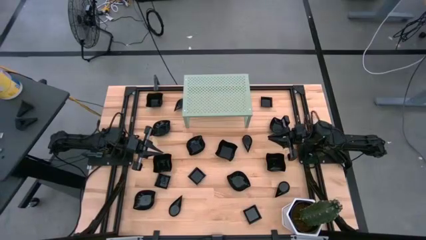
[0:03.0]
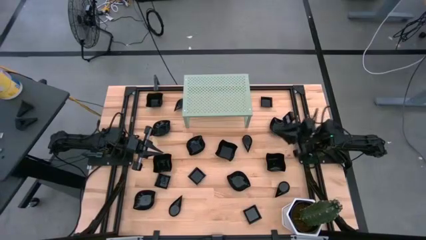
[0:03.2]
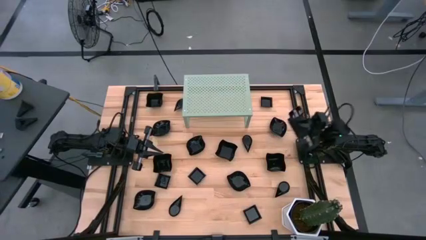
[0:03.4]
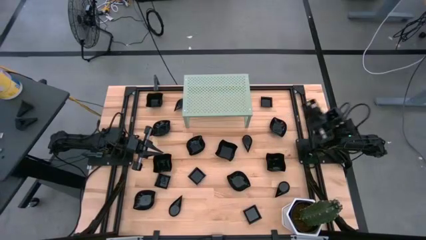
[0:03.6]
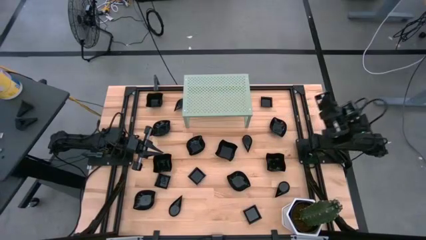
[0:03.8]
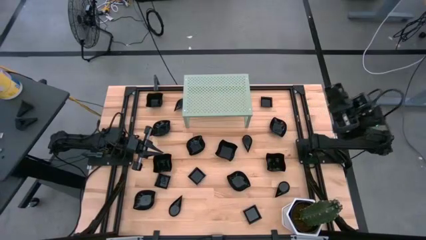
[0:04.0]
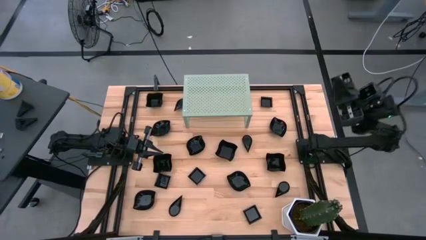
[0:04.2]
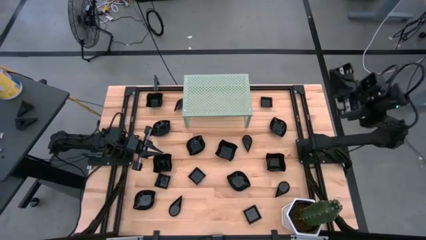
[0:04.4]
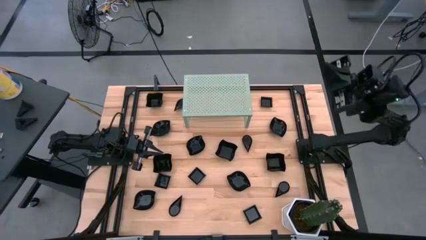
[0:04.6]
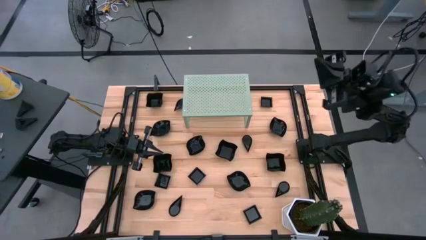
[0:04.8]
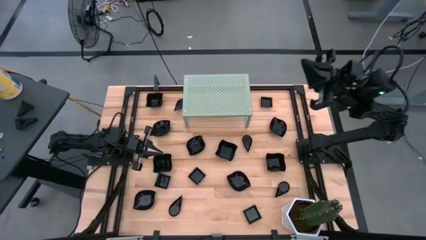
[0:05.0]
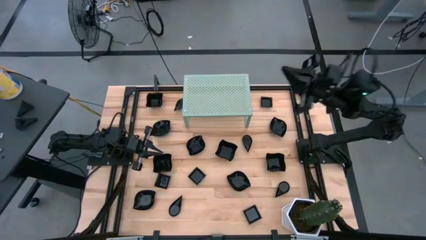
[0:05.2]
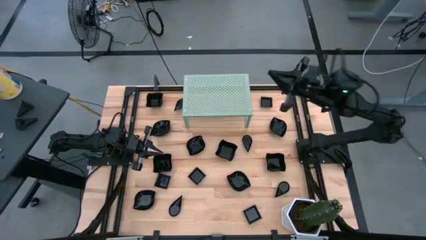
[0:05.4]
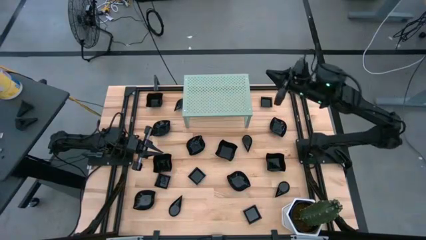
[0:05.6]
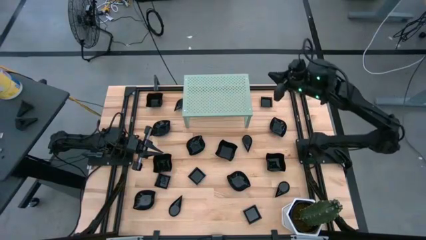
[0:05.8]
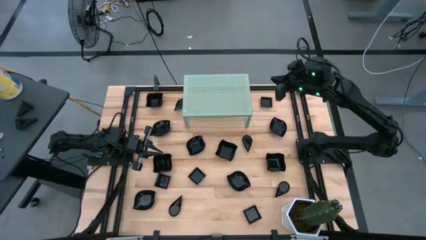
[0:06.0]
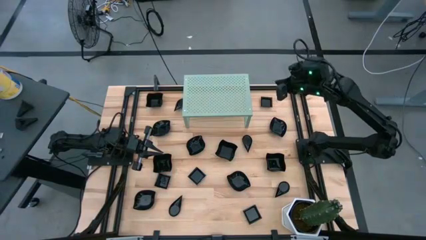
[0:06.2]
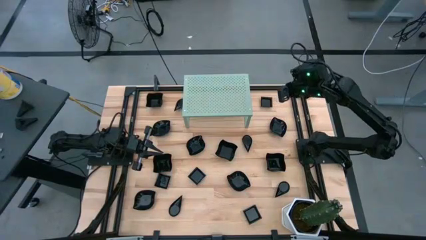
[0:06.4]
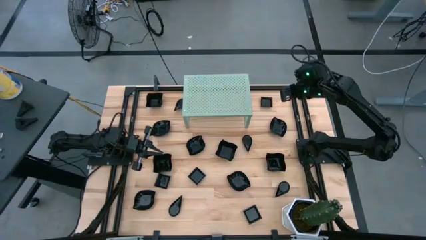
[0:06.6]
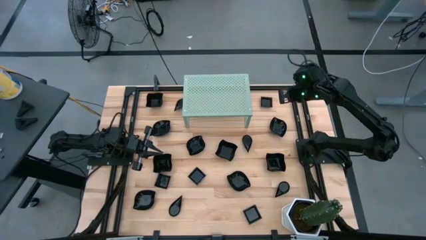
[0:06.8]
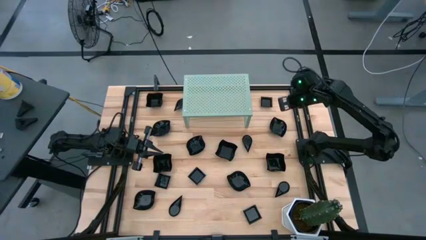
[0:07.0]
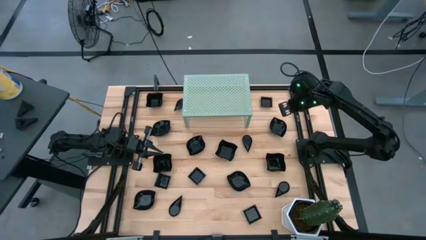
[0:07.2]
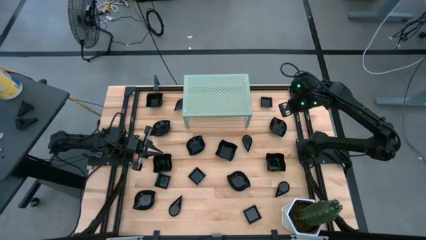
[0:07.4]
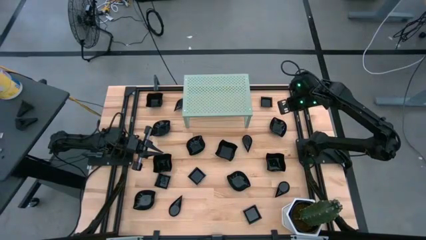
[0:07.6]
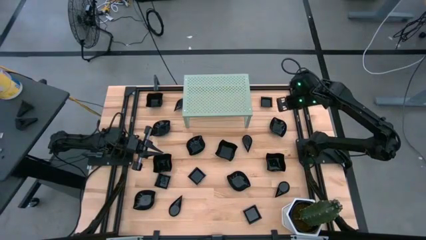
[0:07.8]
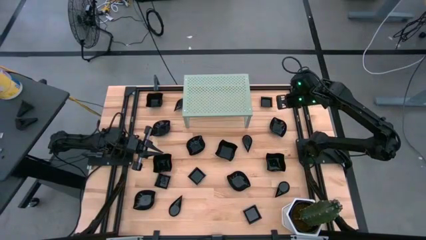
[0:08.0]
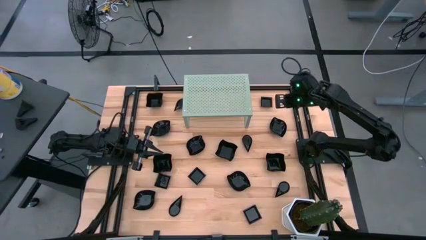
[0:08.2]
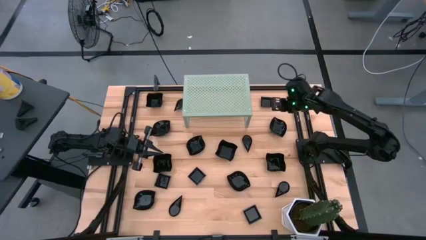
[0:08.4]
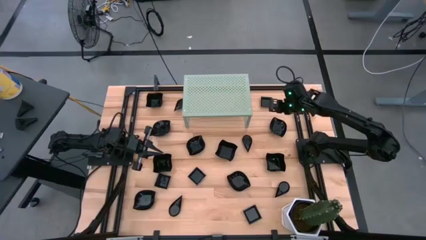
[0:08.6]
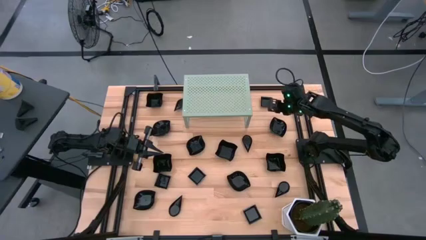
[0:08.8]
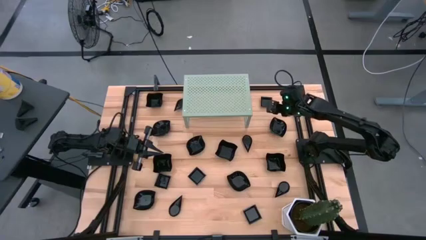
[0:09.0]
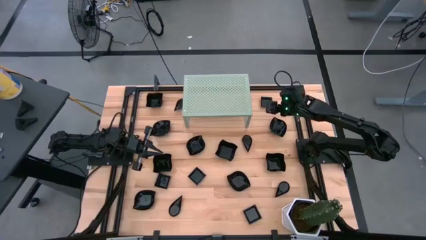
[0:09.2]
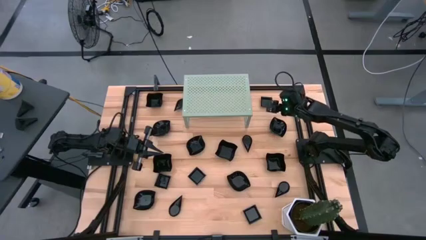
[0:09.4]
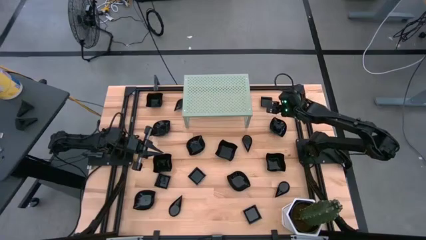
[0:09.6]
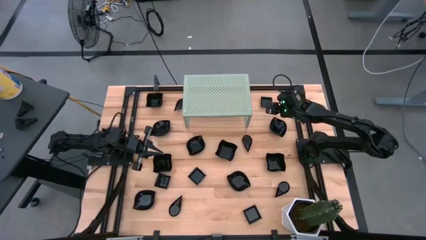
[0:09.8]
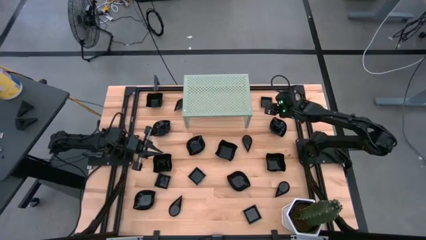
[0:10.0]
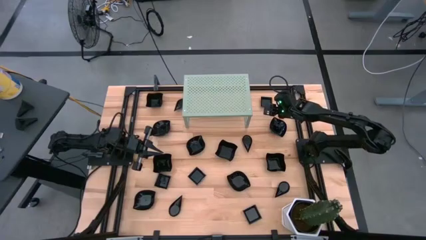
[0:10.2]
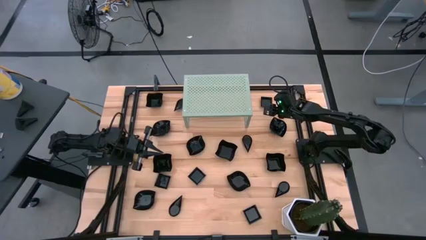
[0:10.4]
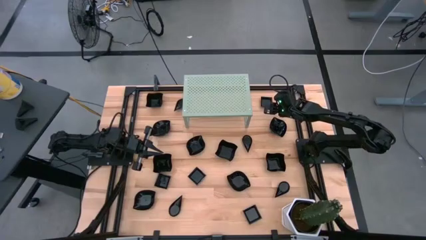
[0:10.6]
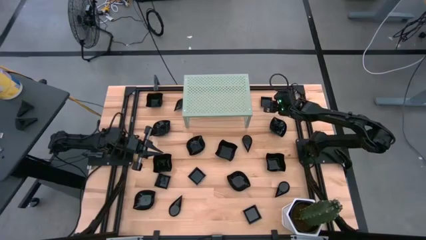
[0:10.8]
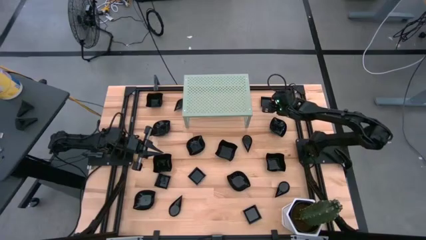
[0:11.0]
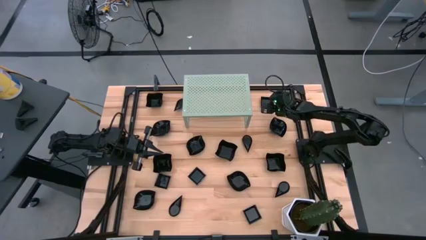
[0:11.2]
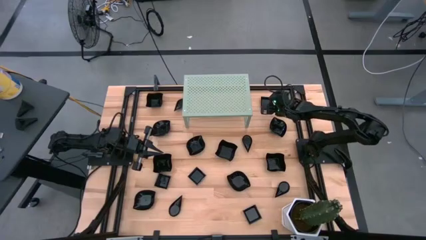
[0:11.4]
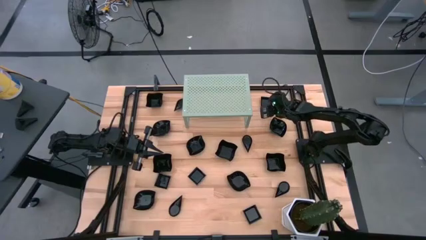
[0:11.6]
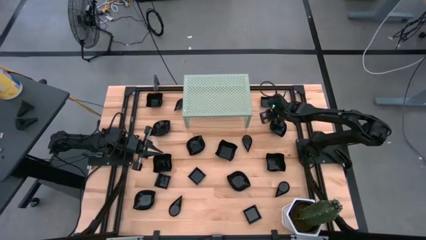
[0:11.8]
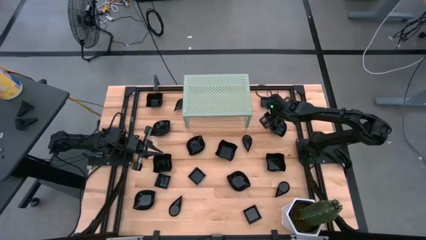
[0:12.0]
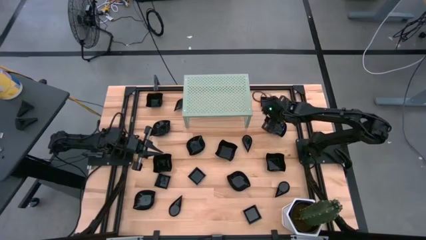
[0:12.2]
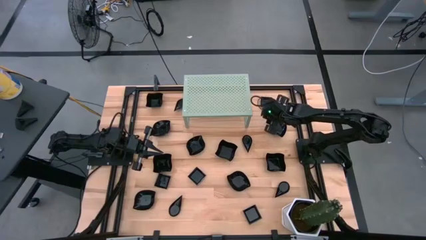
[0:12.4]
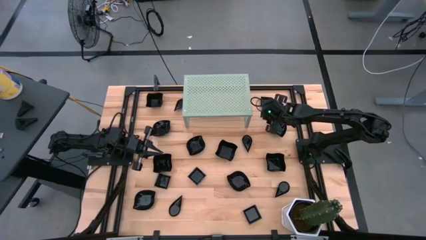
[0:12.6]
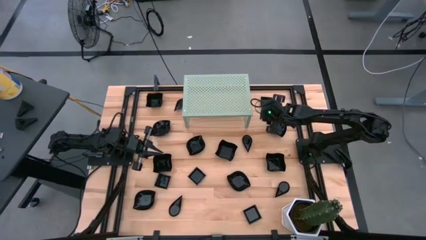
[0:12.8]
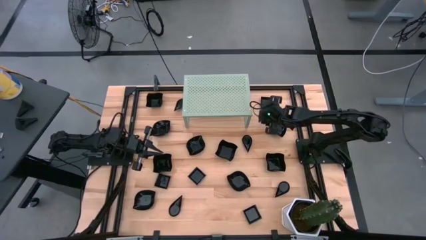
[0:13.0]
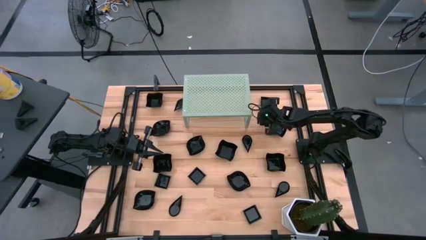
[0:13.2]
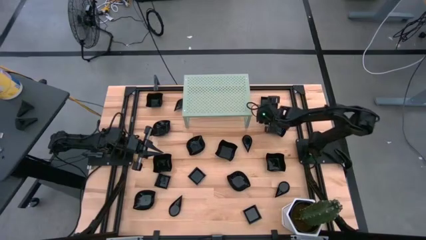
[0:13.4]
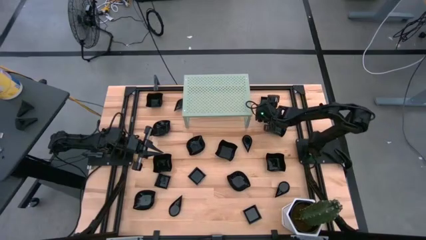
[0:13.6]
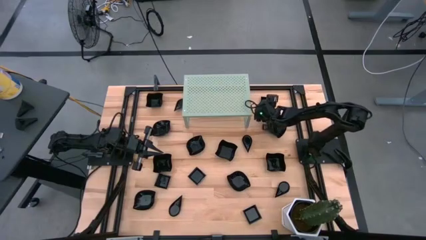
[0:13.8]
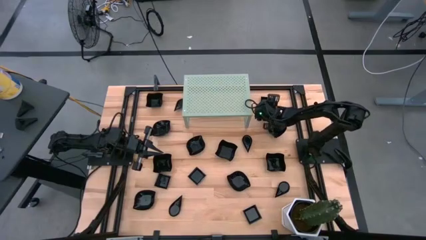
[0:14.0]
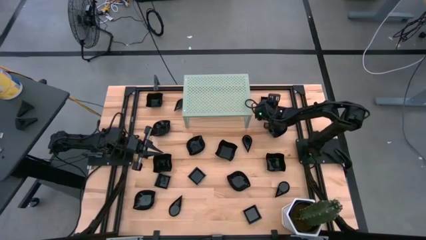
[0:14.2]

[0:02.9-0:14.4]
Task: Pick & Place Mini shaped plates
Put the square plate on the shelf

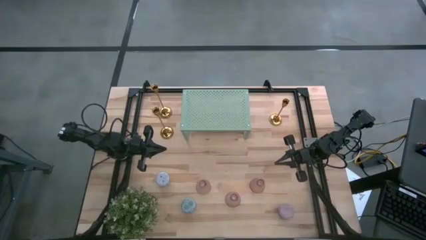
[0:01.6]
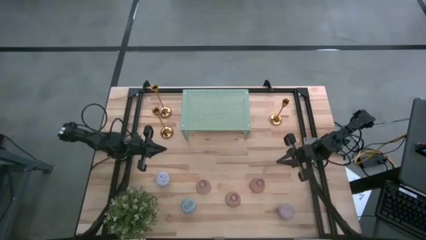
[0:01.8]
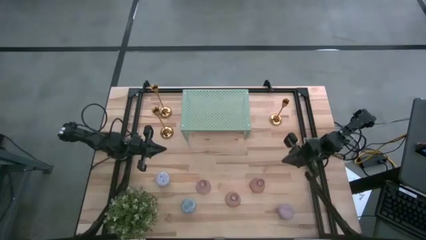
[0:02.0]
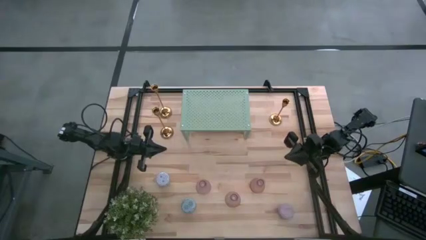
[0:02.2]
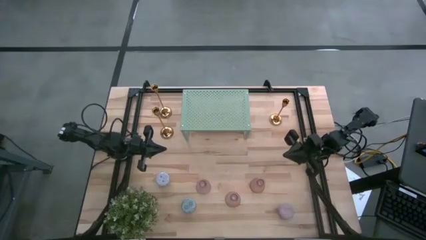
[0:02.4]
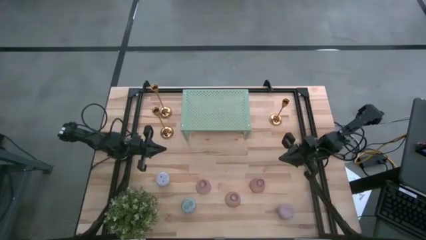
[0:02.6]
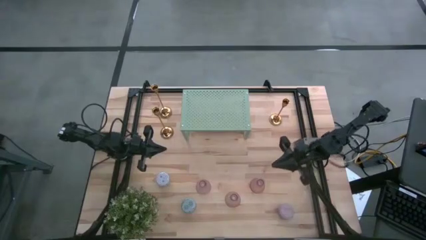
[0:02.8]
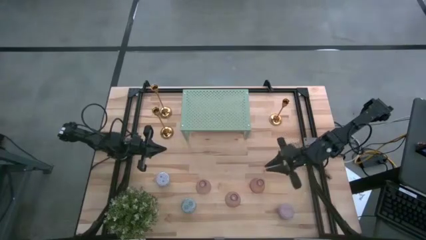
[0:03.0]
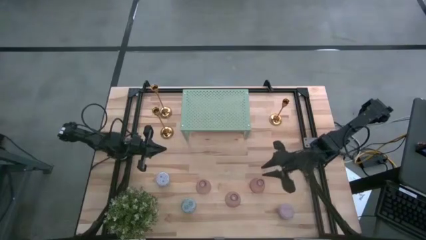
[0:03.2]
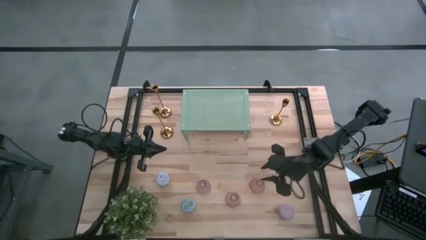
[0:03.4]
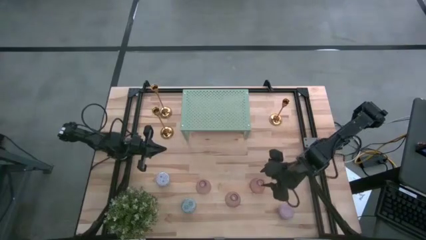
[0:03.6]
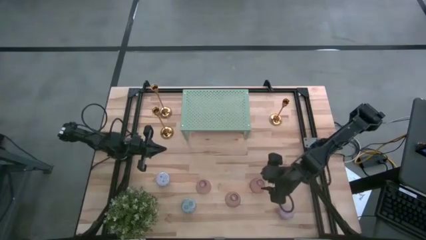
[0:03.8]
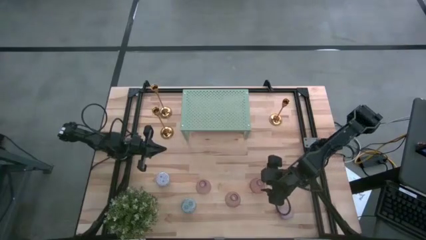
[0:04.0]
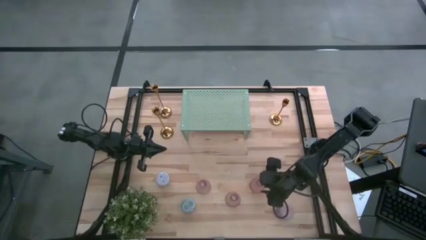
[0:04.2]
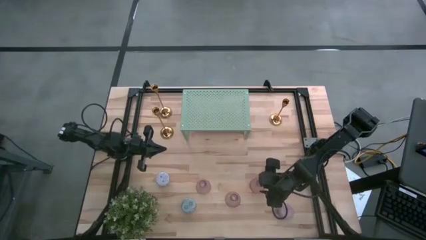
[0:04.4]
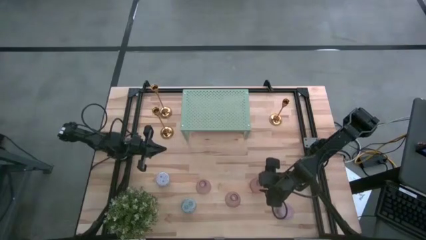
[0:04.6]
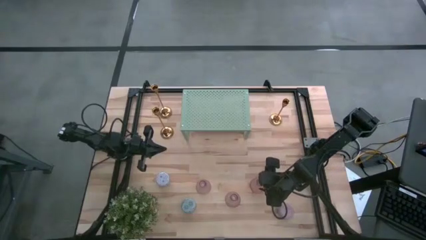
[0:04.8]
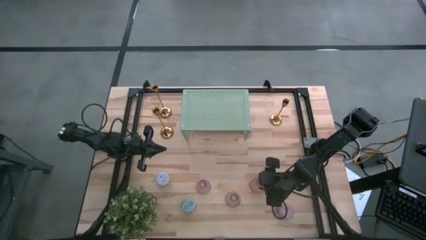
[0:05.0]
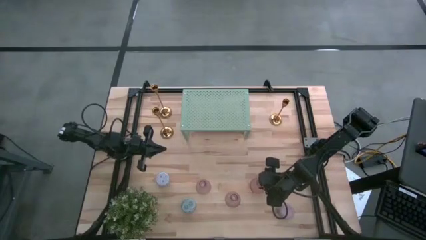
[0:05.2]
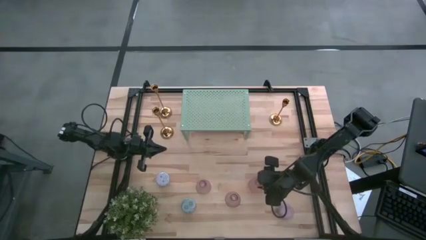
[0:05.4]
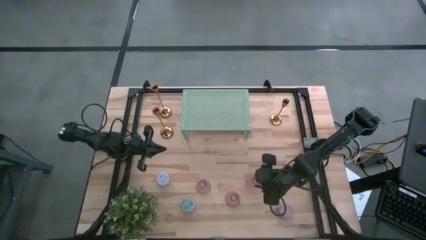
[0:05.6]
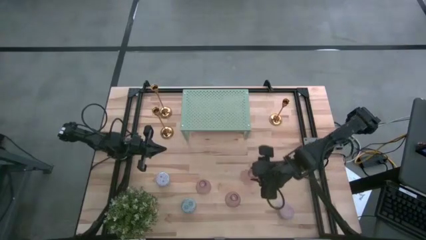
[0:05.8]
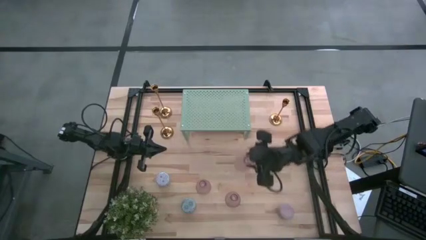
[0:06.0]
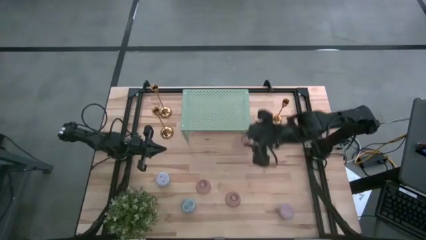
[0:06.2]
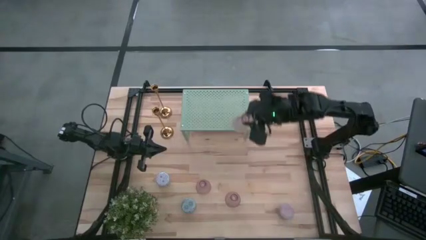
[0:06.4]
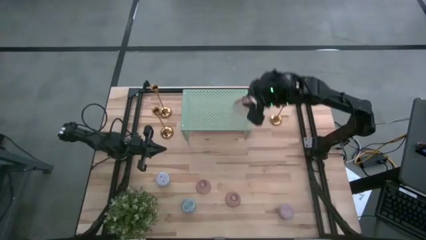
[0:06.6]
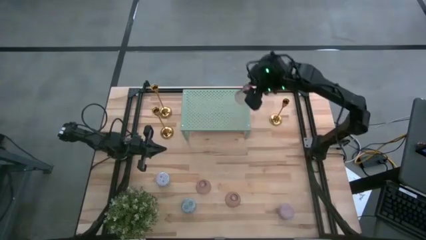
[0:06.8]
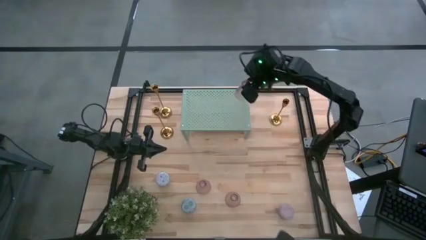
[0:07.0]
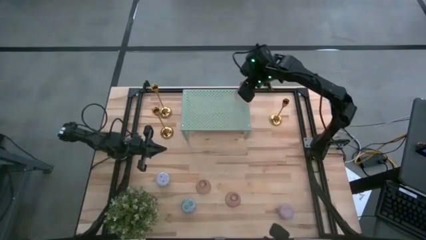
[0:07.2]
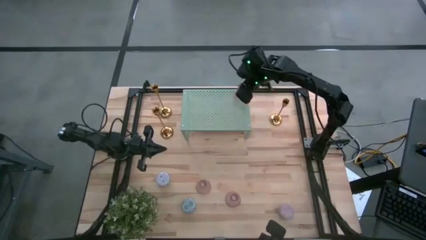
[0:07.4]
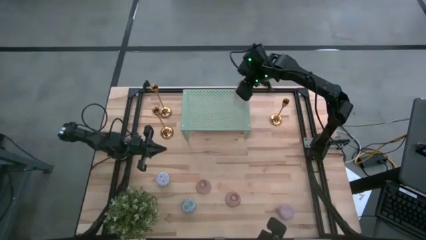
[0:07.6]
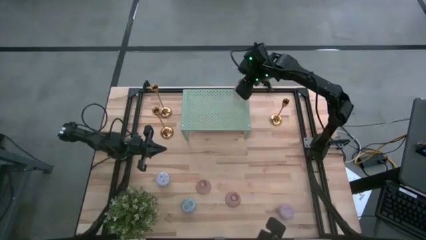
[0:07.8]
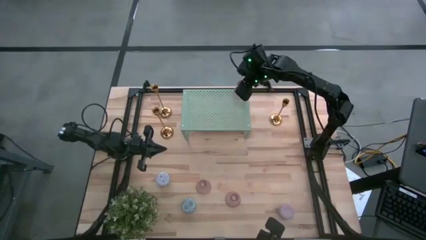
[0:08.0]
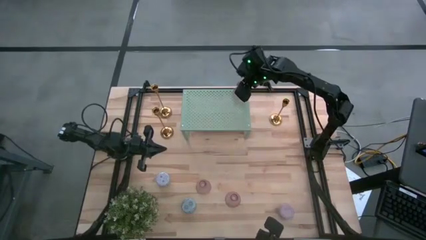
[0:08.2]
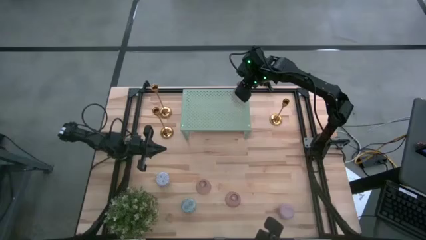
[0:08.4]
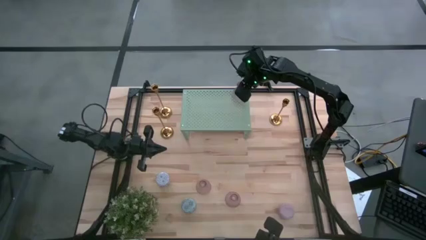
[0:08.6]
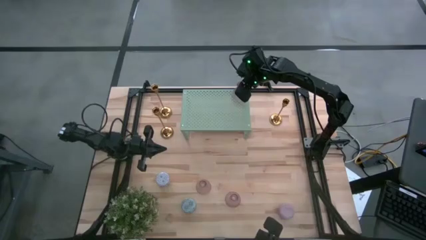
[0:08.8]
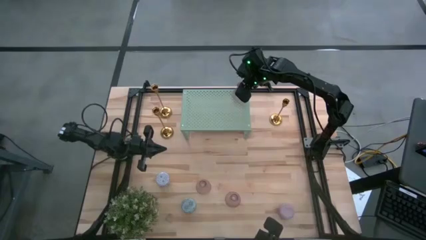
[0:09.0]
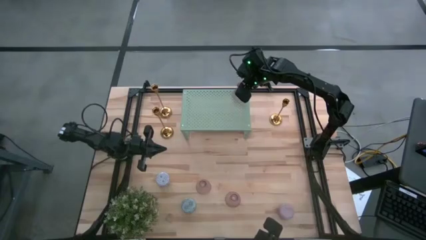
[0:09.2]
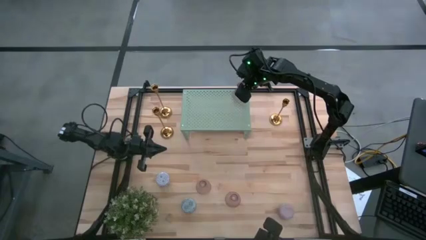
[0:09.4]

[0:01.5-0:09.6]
Task: Pick & Place candle stick holders
Put the right glass candle holder on the shelf
